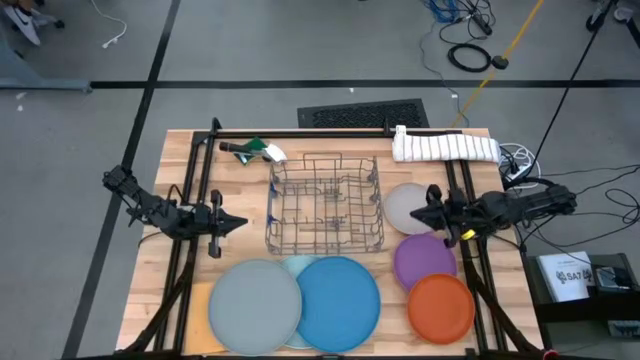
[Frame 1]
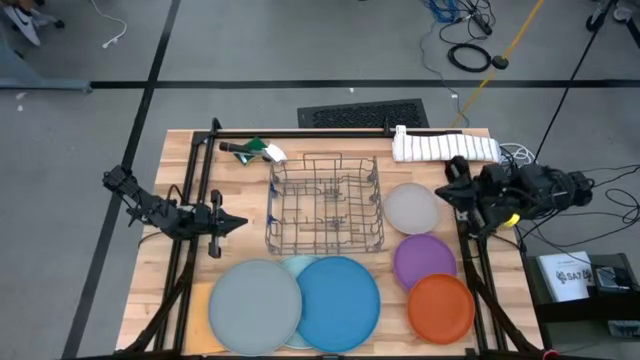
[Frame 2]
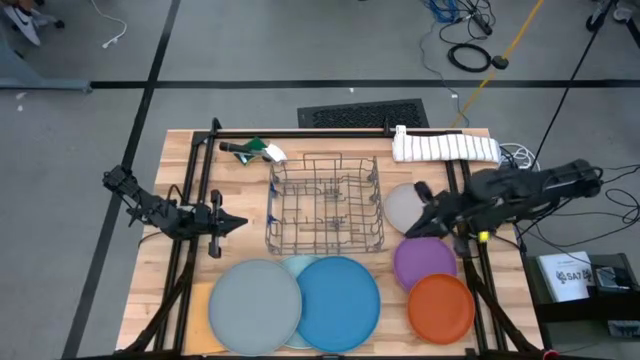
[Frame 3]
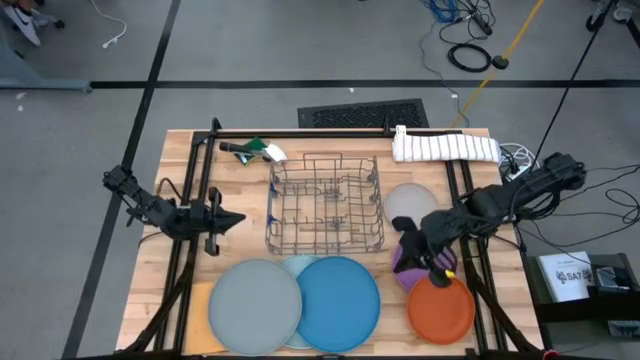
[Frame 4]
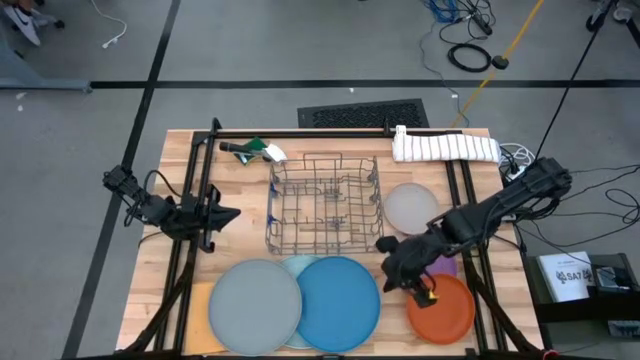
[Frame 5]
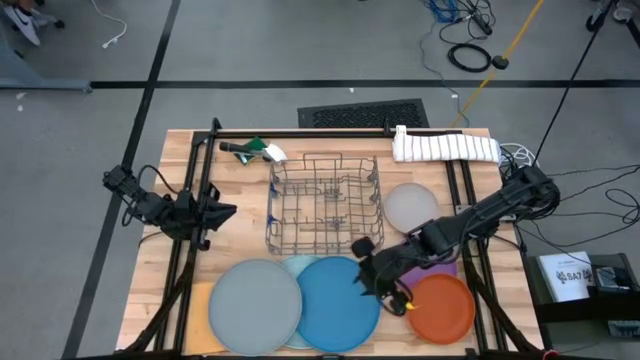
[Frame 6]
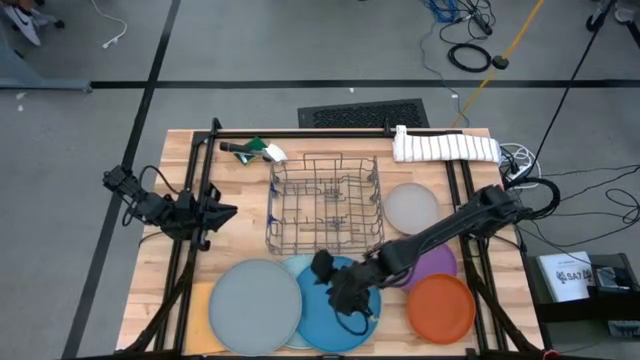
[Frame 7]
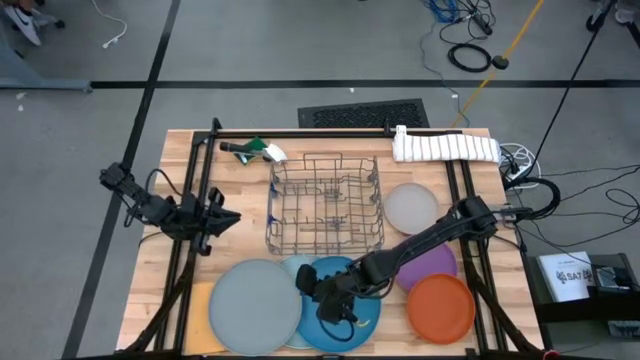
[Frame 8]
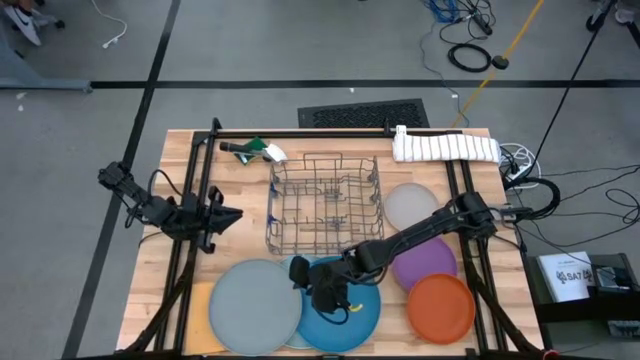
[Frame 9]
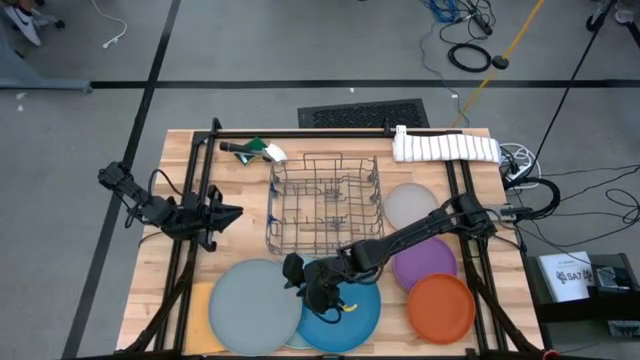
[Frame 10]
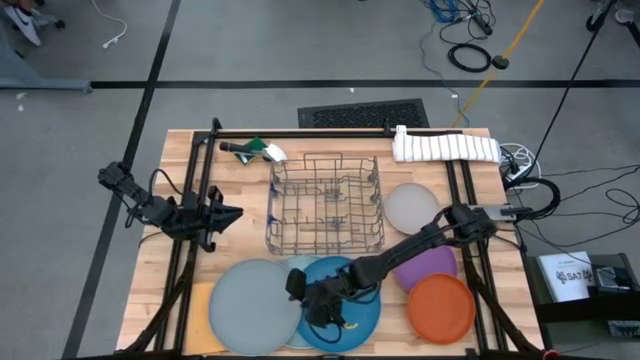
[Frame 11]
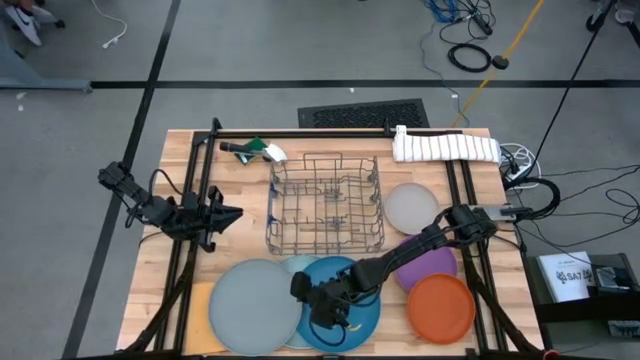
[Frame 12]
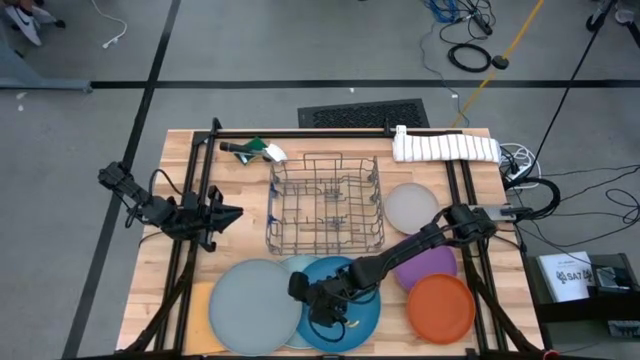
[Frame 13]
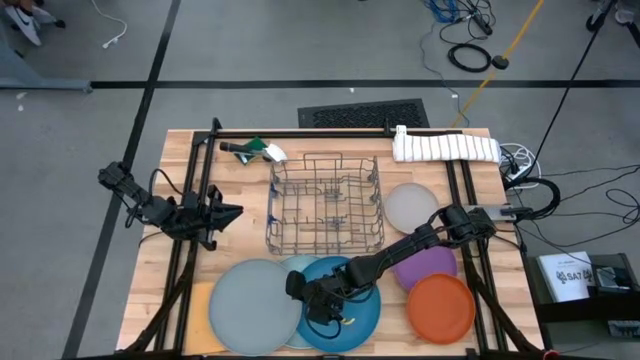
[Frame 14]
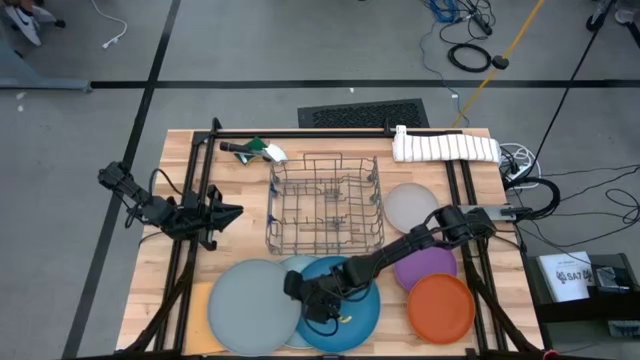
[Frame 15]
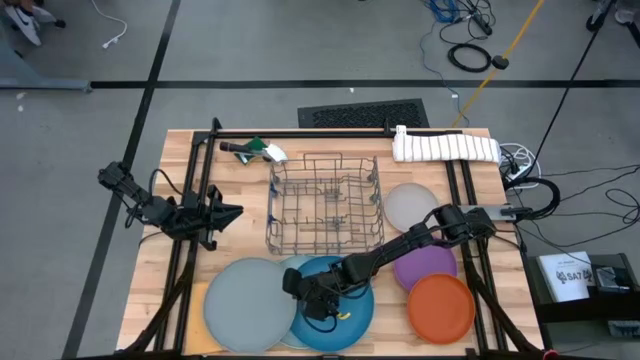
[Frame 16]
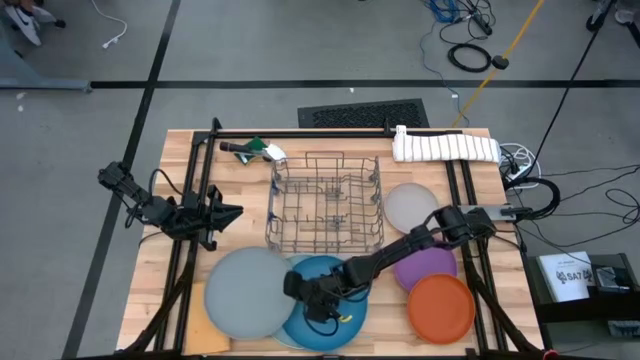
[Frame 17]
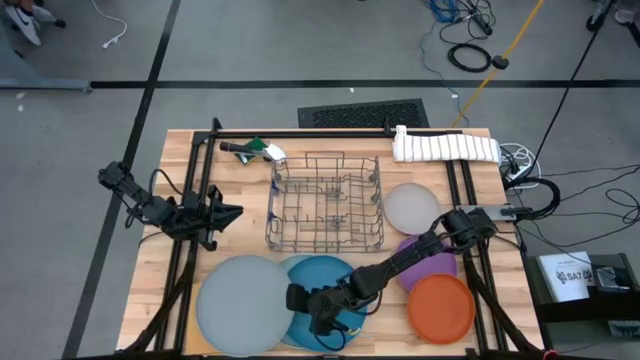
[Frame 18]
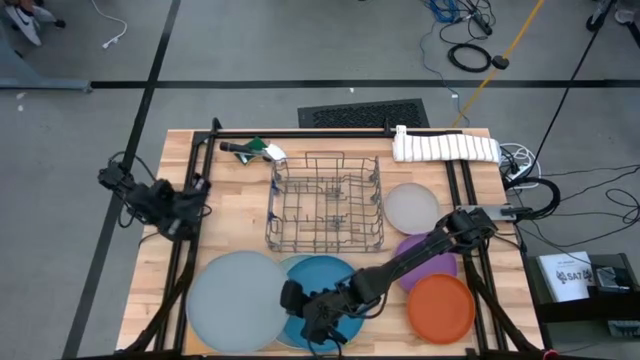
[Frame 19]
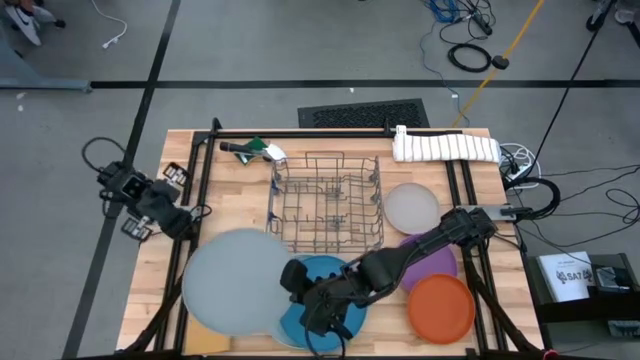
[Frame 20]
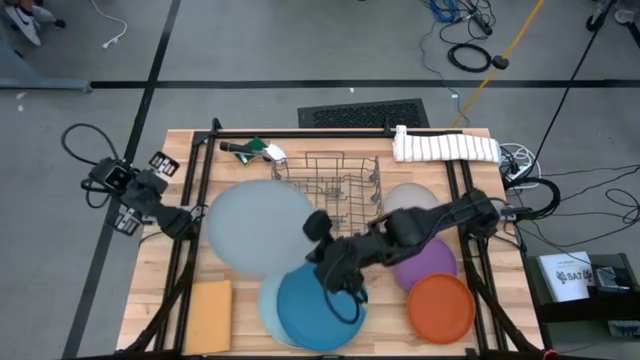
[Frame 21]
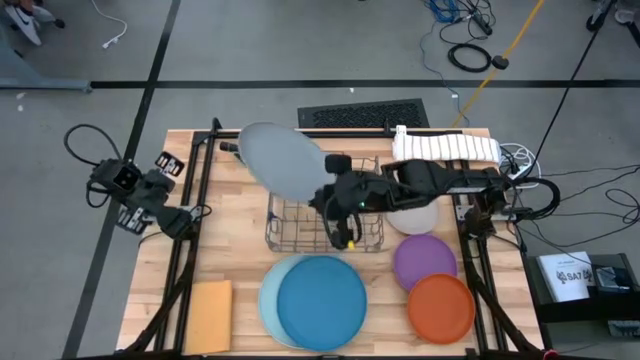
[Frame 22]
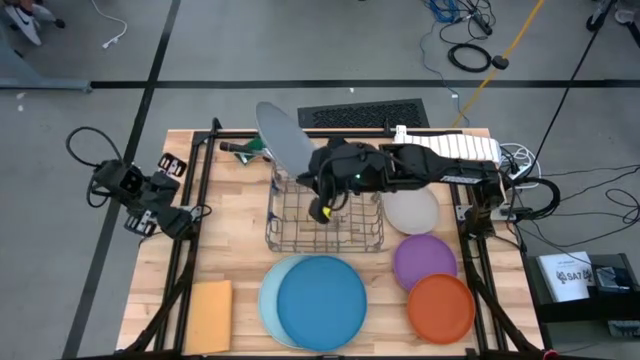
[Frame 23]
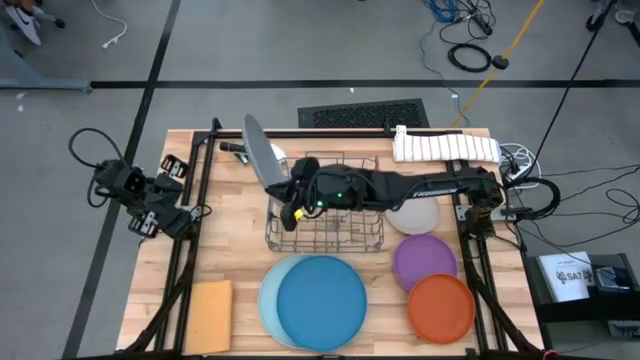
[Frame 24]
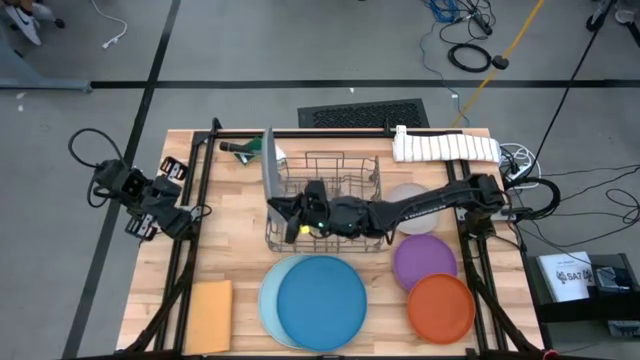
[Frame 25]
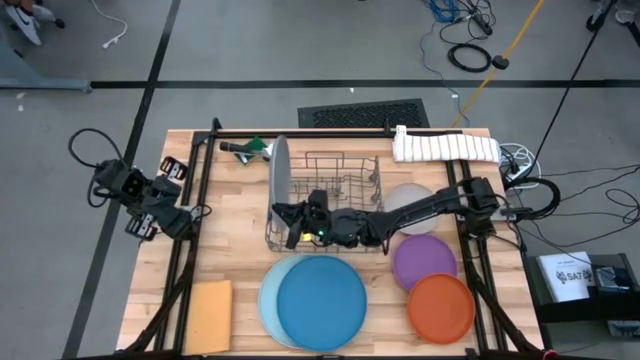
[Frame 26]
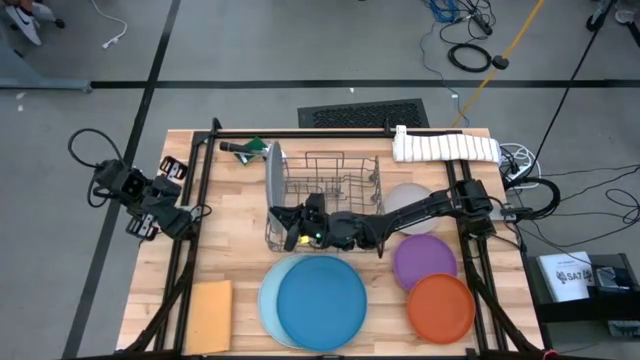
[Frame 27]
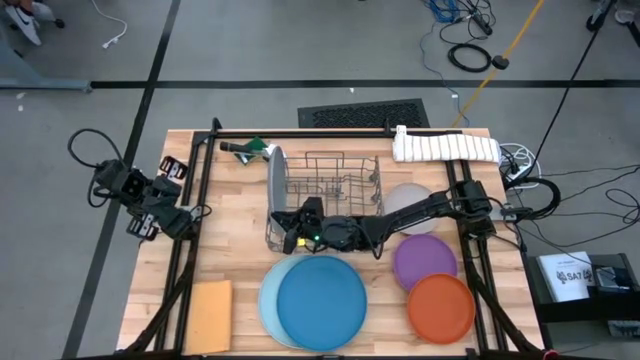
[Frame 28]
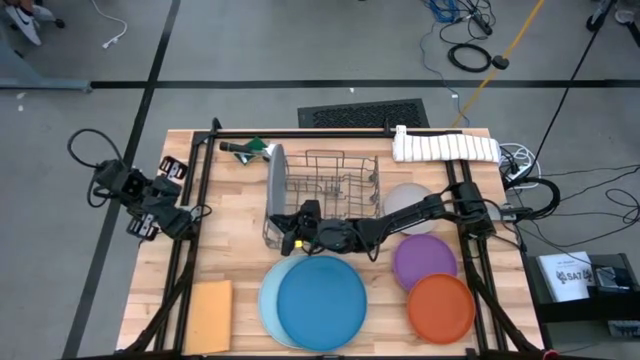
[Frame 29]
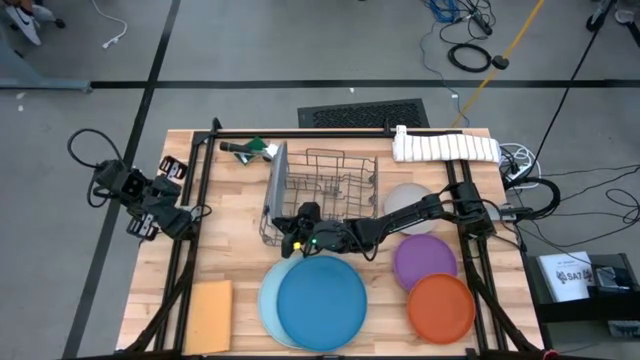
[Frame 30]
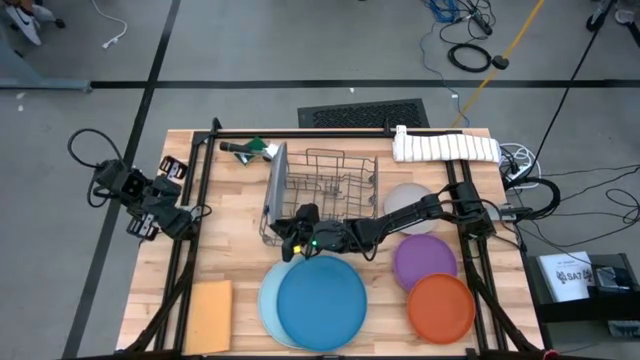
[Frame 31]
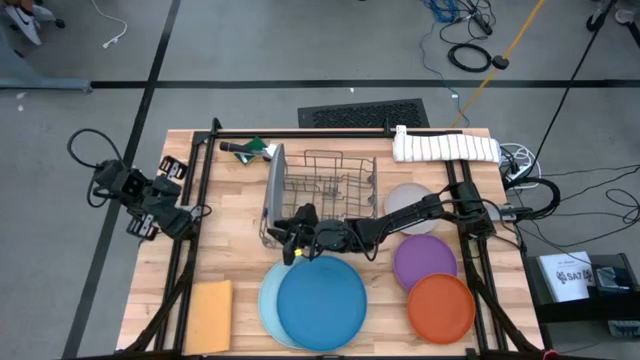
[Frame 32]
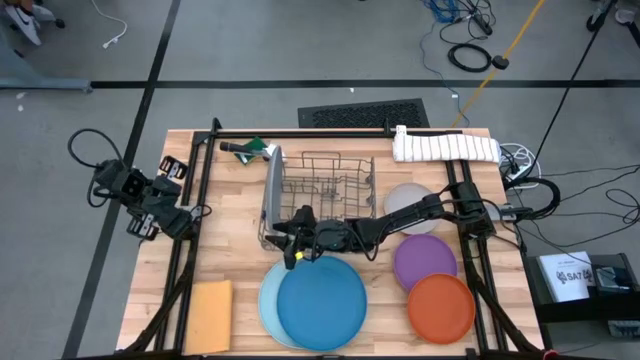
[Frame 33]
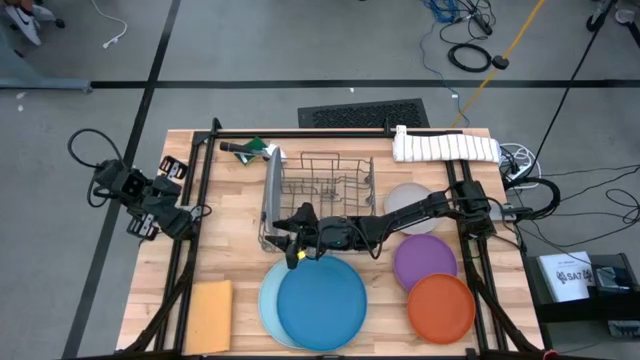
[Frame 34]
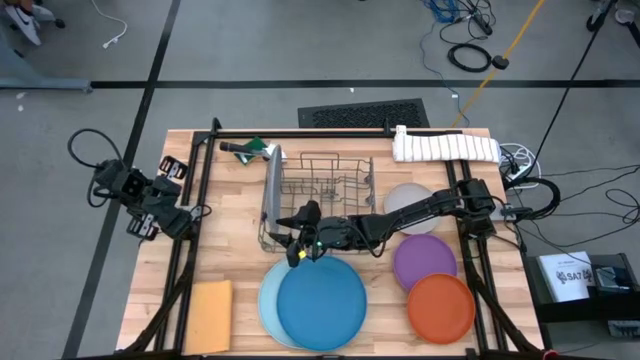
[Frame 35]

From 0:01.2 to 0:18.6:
Task: Sort dishes
Put the green plate into the green dish rack
